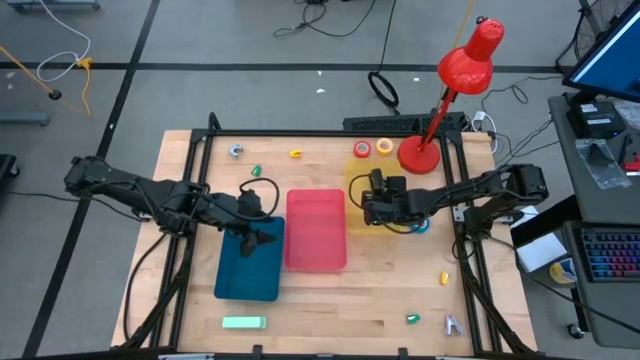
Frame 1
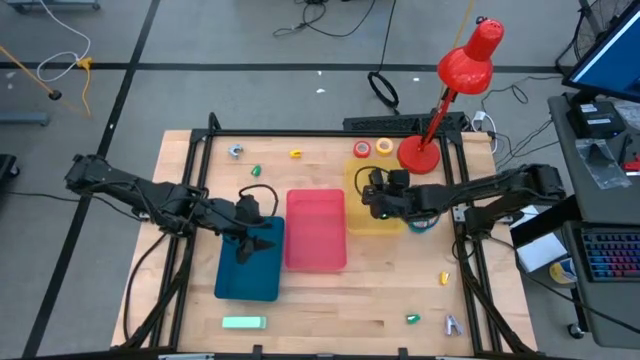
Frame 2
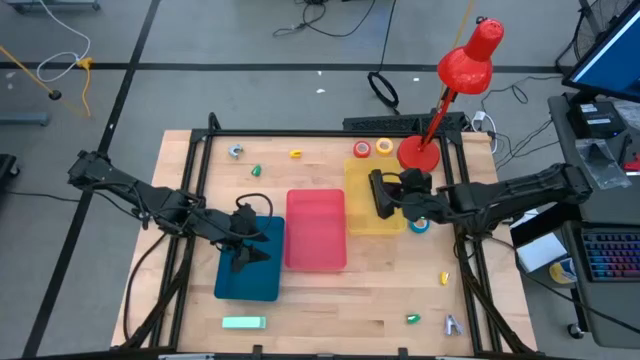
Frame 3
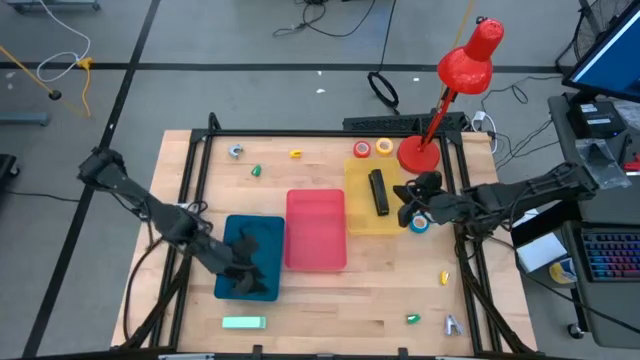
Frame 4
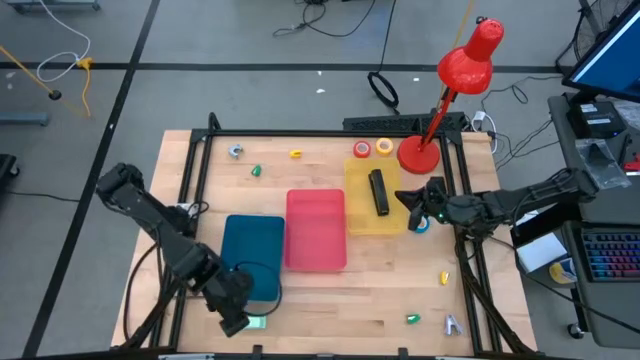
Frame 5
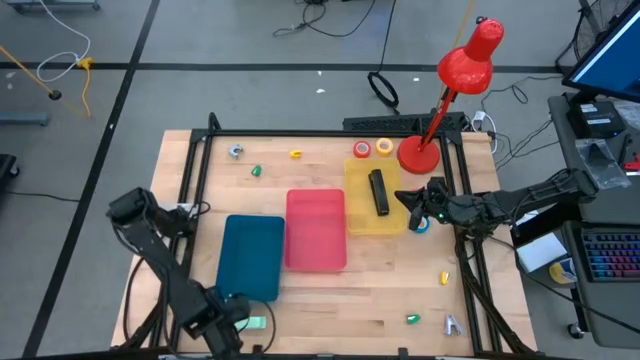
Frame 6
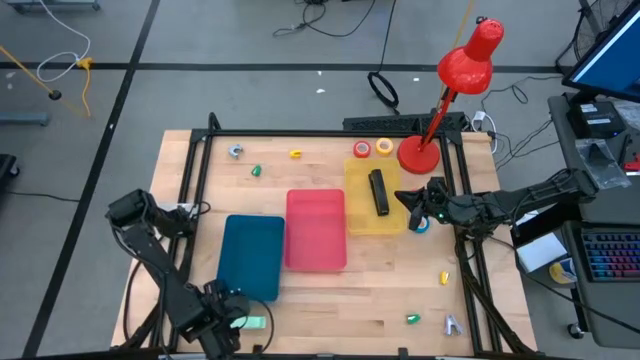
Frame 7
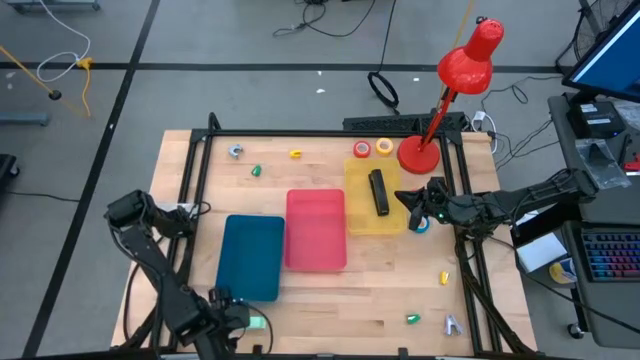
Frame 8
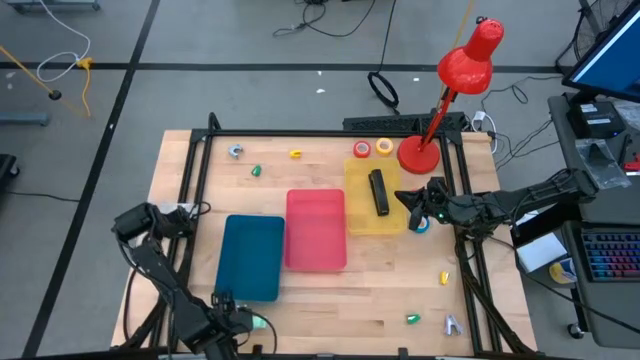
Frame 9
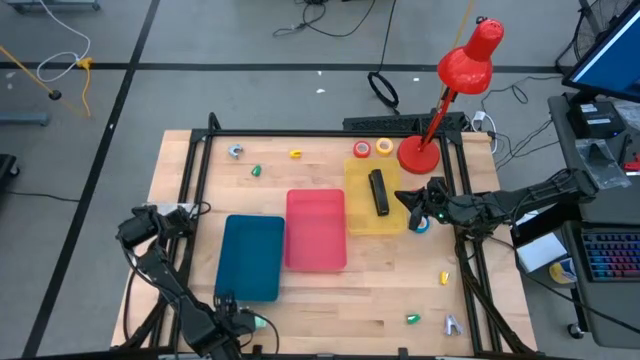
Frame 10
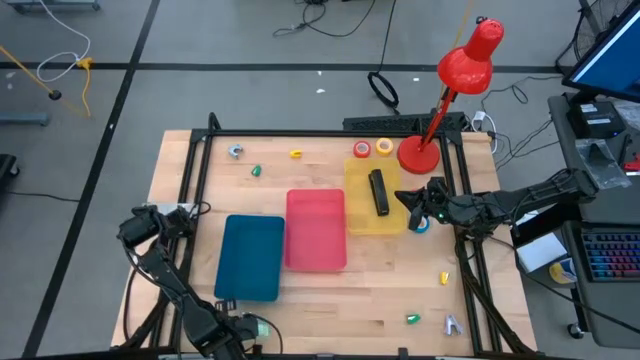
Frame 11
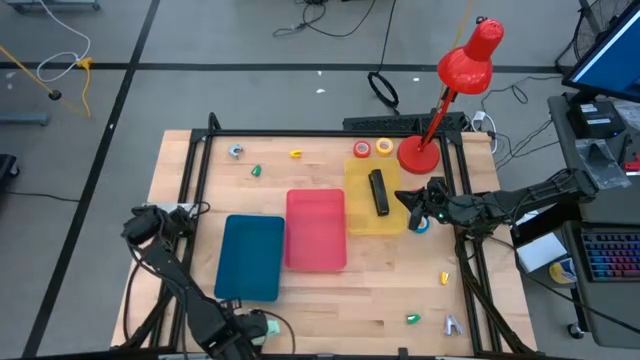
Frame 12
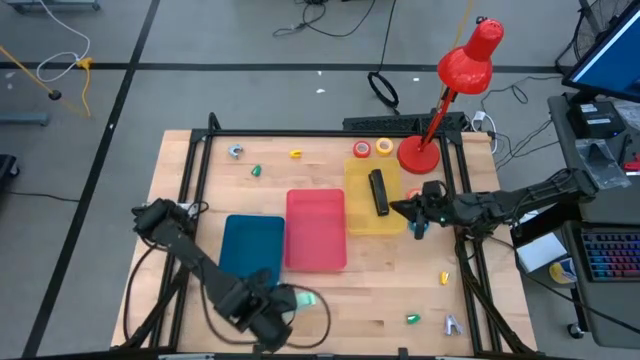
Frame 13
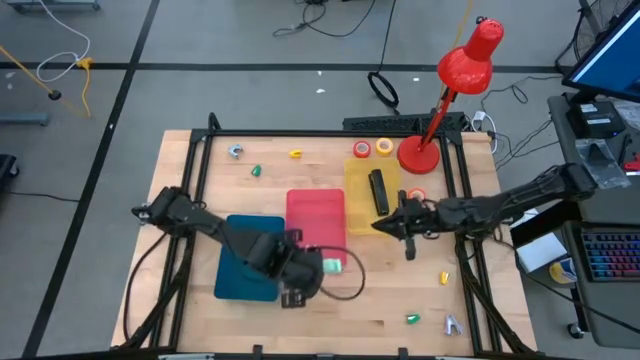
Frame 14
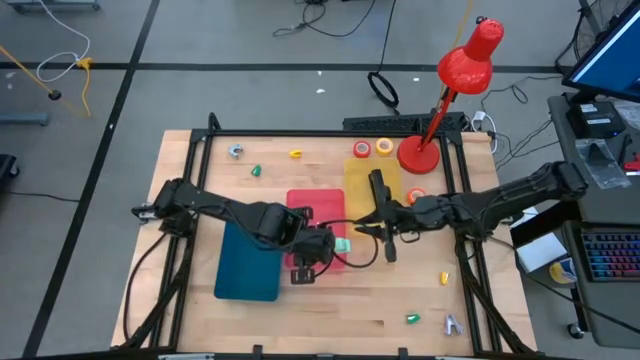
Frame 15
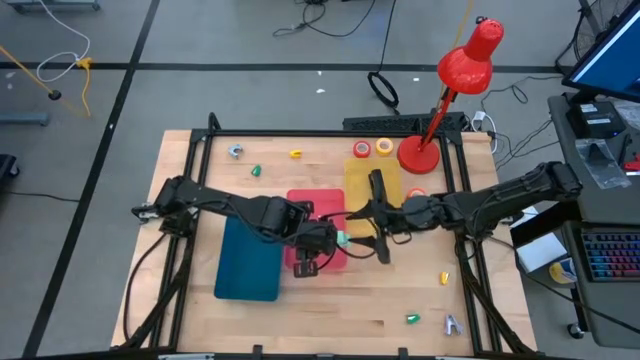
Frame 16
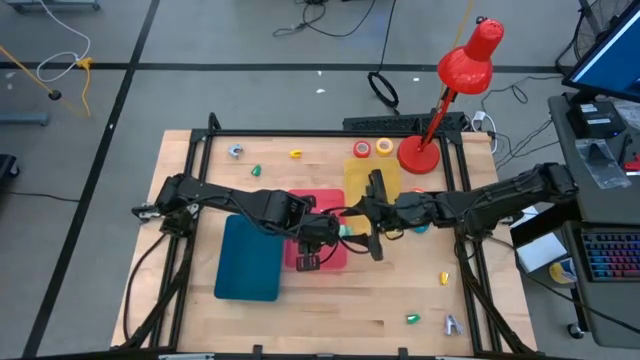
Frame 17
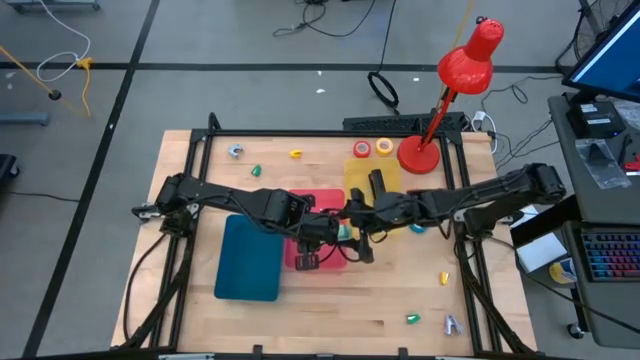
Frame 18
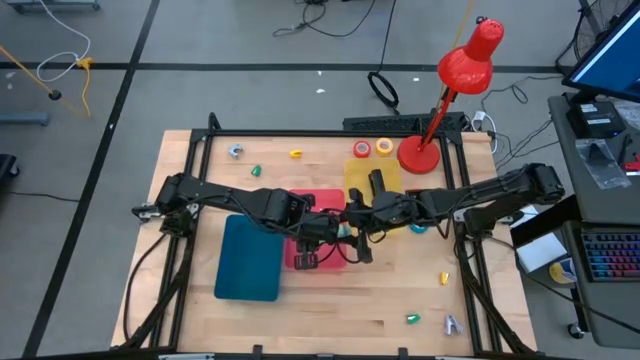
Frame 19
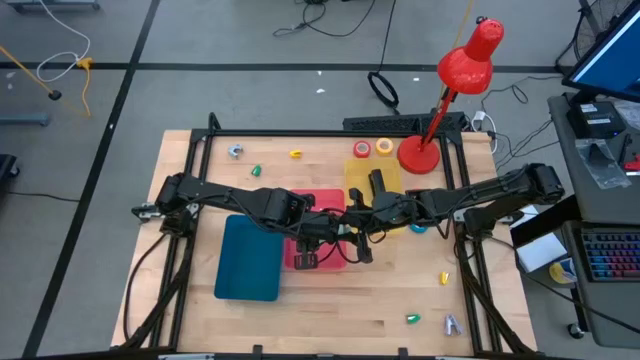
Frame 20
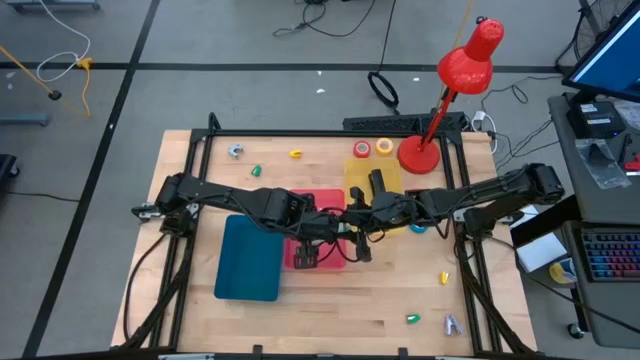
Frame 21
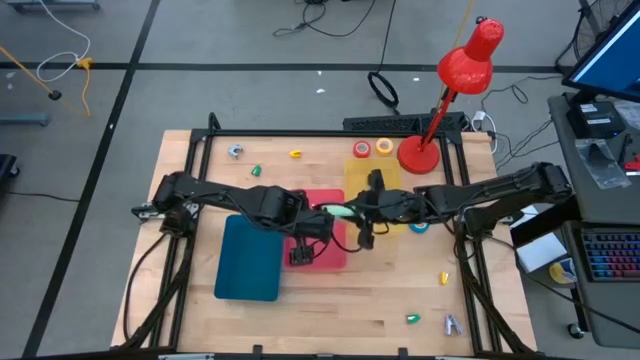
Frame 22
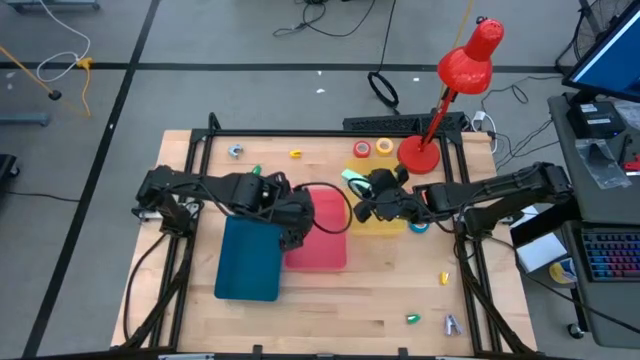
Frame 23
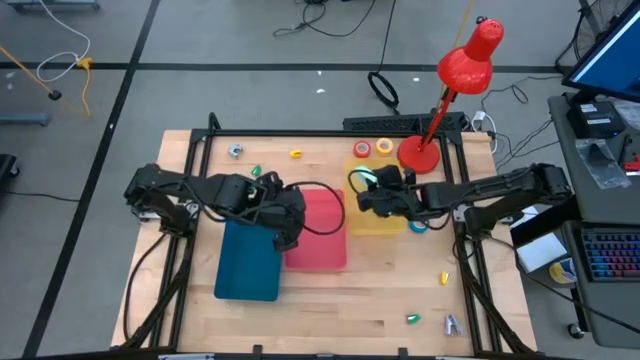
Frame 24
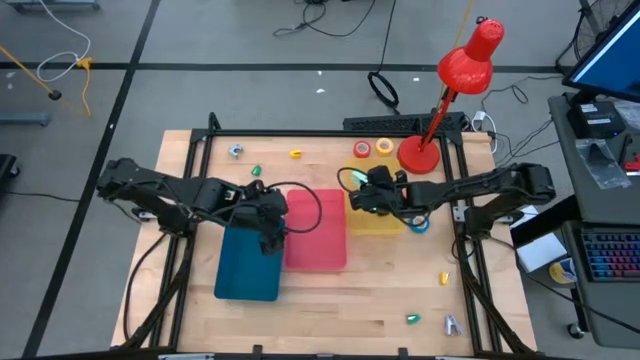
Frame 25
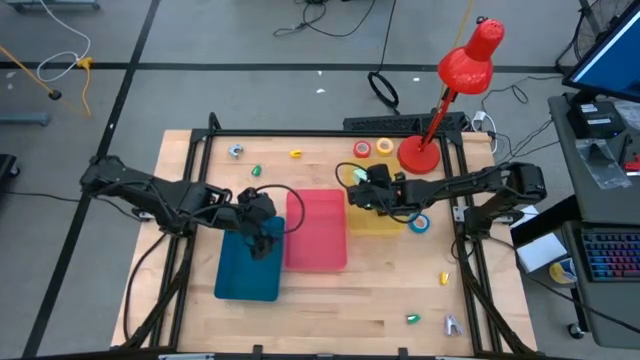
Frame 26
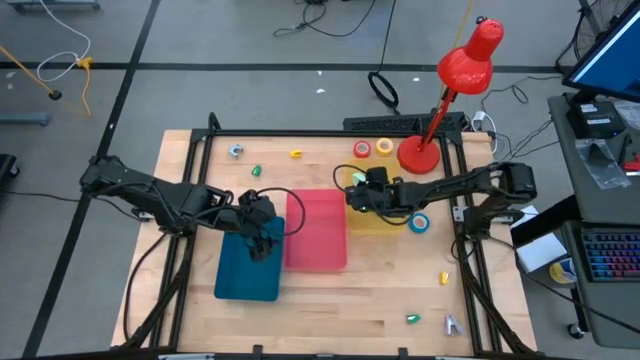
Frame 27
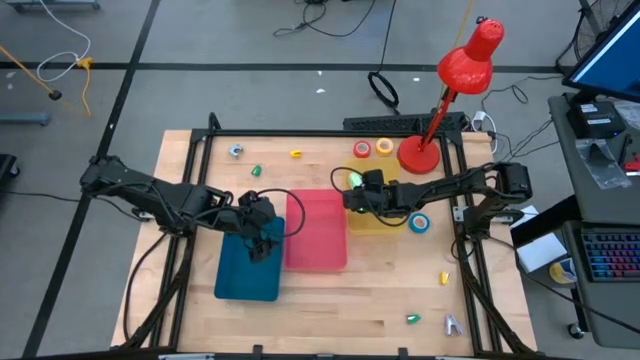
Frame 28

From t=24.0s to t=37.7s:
Task: Pick and place Stapler, Stapler remover, tape
Put the light blue stapler into the yellow bin

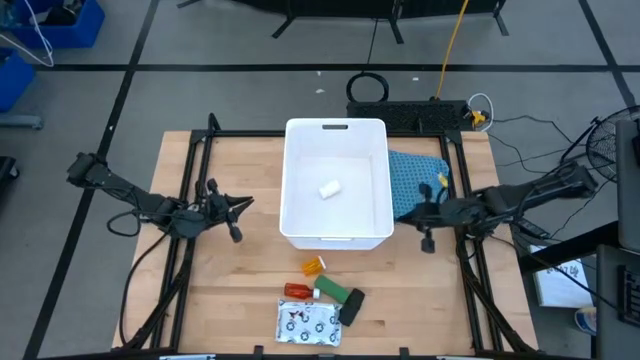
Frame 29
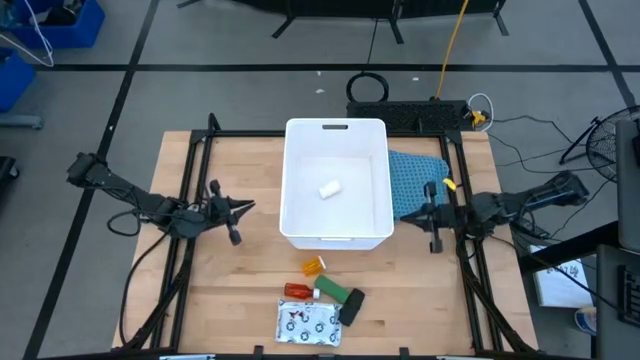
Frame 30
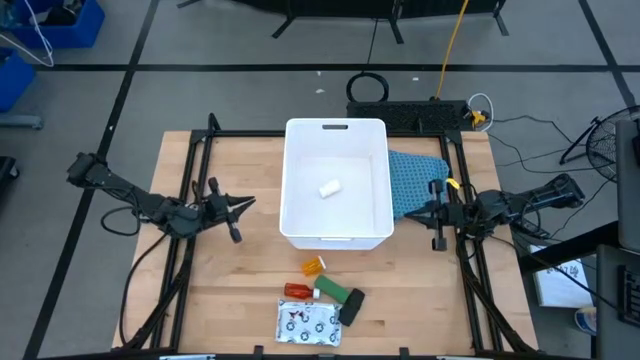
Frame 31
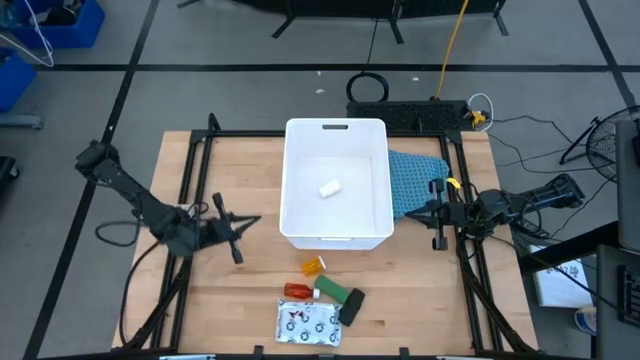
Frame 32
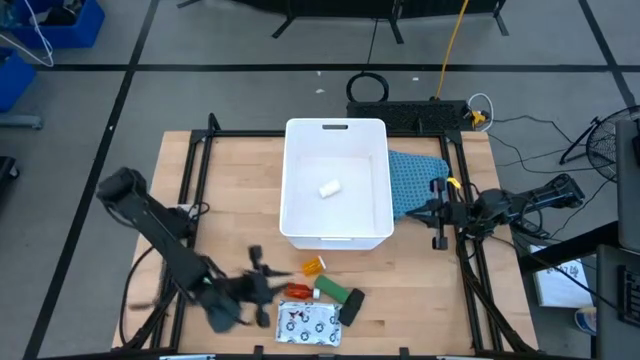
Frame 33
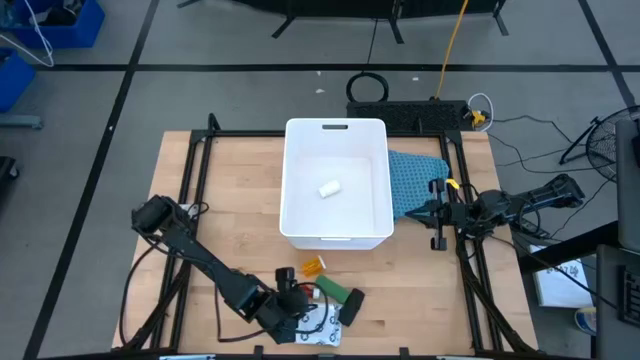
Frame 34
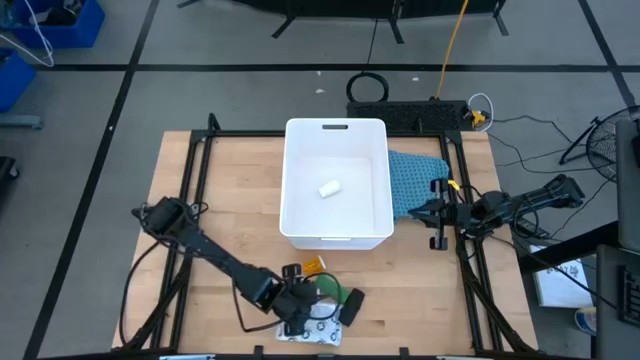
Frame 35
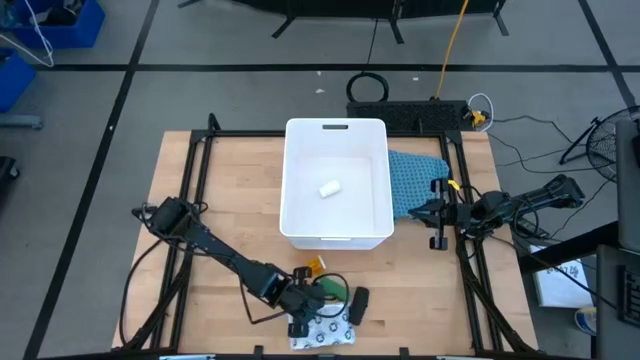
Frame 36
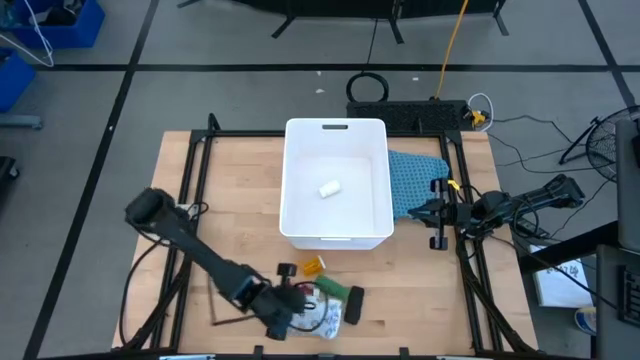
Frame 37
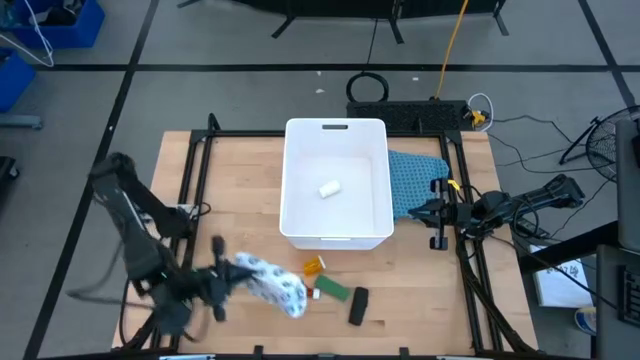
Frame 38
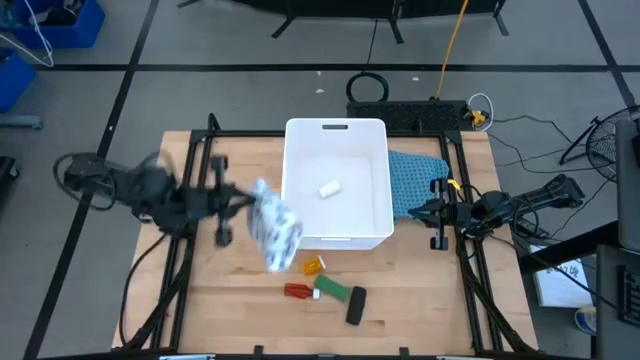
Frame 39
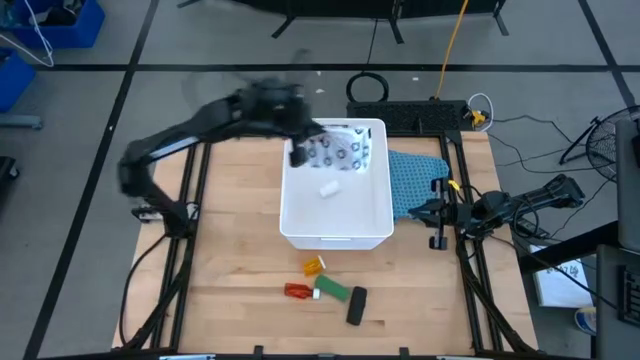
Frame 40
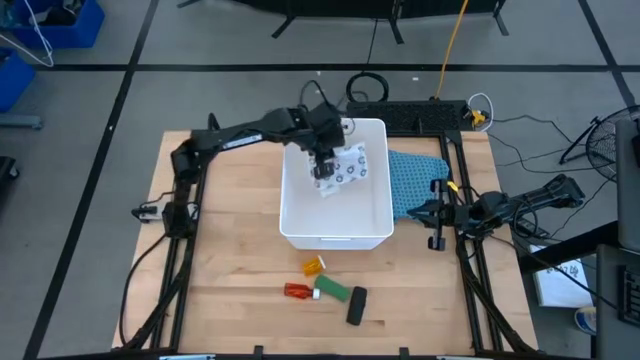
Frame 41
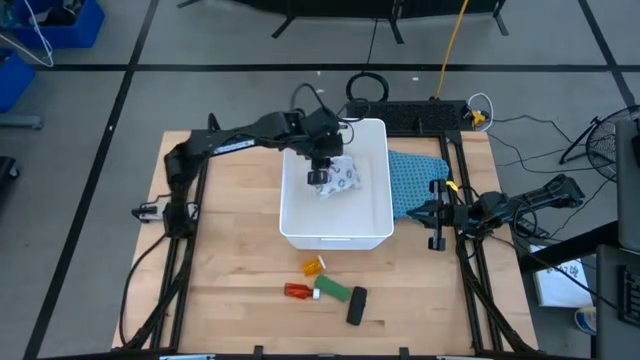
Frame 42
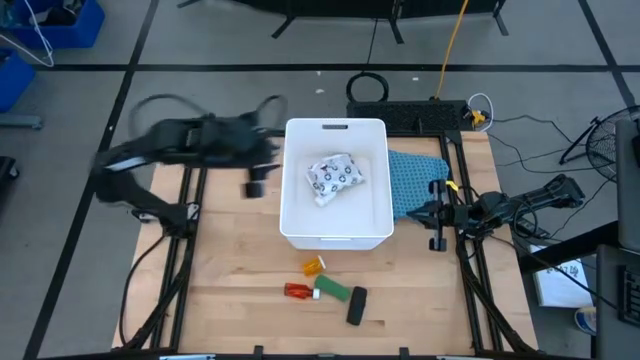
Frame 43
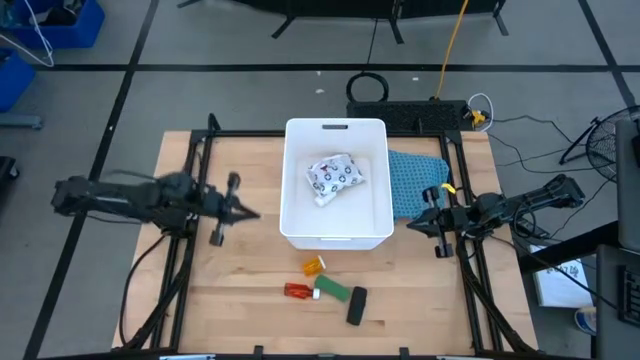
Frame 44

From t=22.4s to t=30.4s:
Task: Pick & place medical supplies in basket/bin
Put the white mailer bag into the white bin
